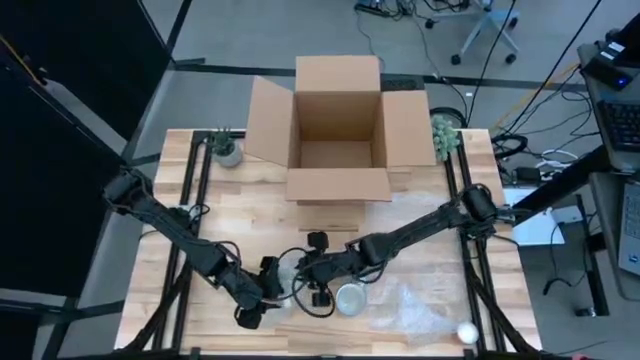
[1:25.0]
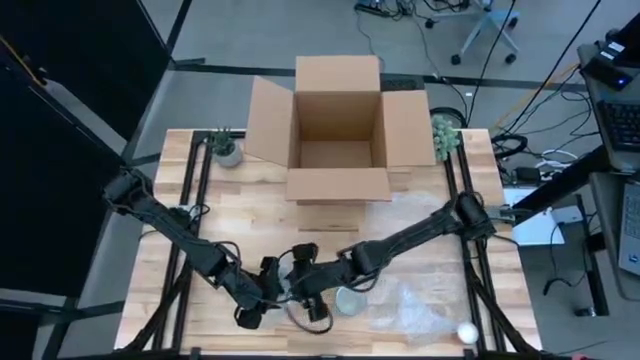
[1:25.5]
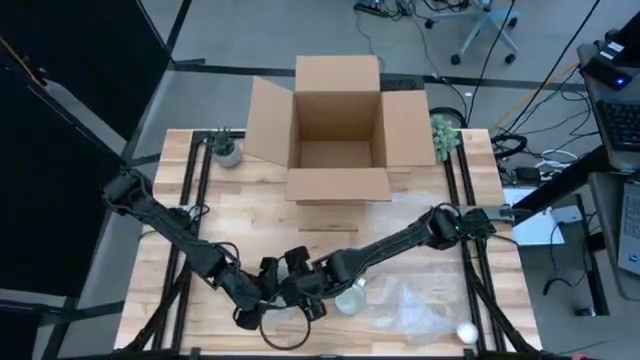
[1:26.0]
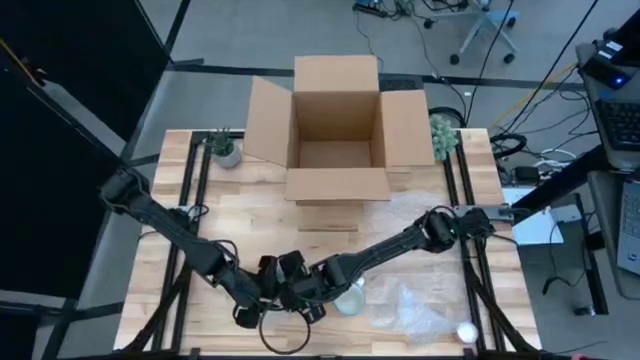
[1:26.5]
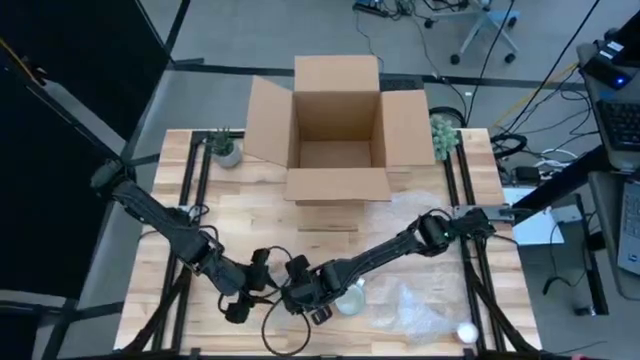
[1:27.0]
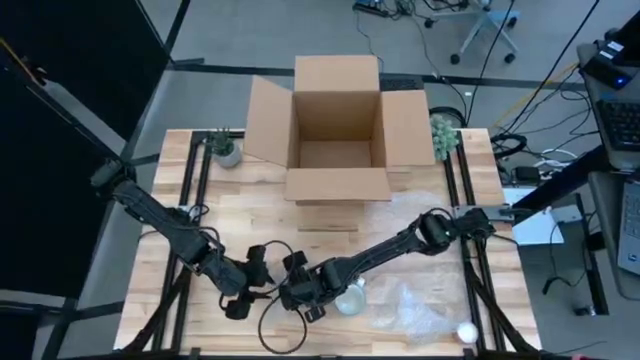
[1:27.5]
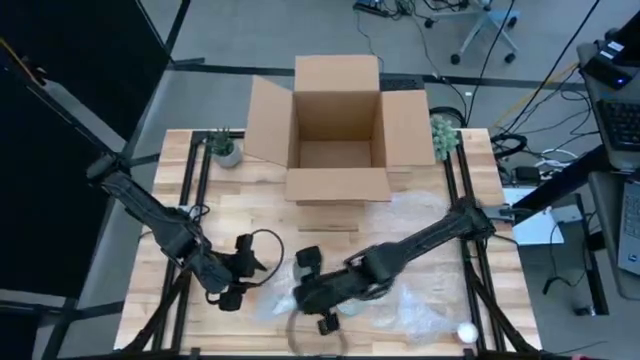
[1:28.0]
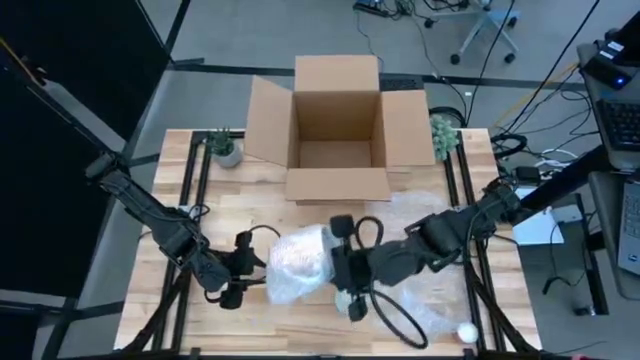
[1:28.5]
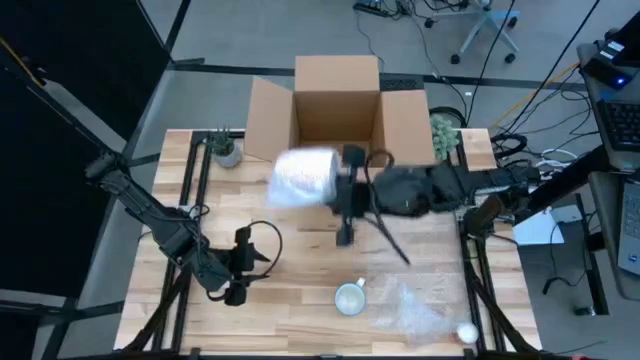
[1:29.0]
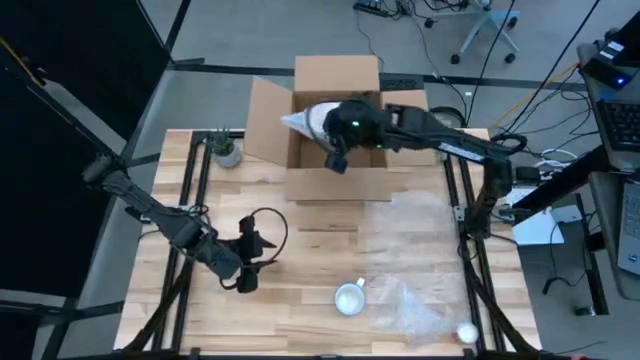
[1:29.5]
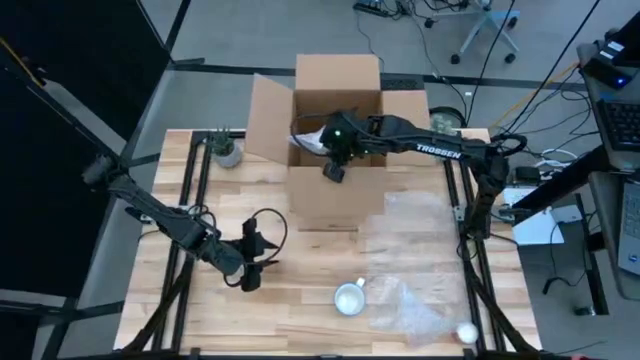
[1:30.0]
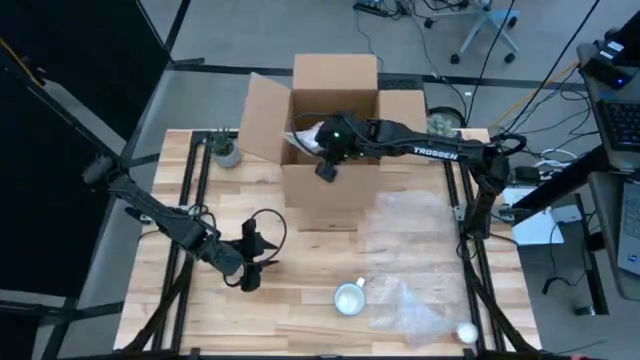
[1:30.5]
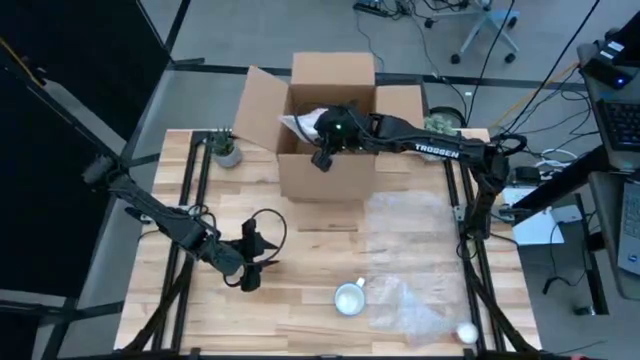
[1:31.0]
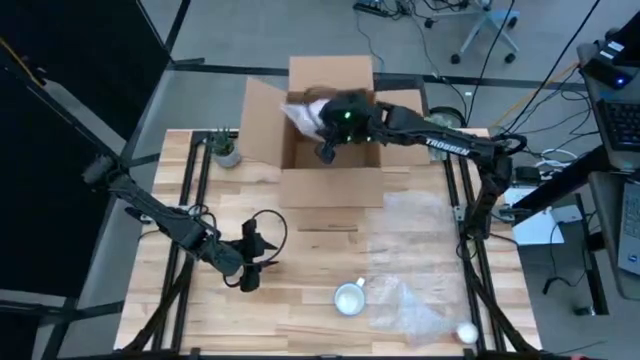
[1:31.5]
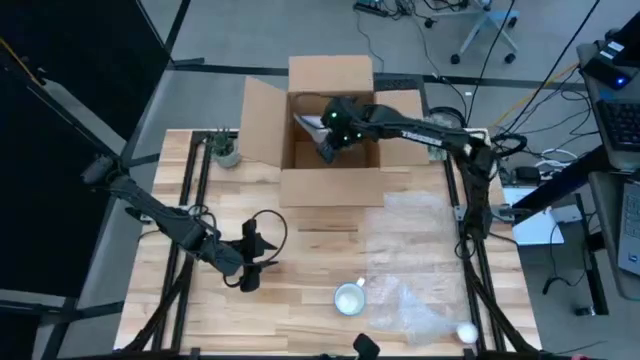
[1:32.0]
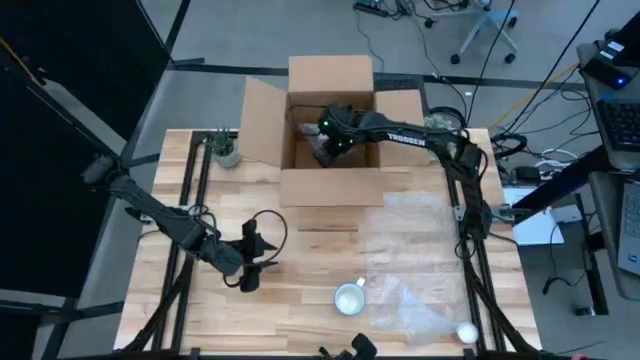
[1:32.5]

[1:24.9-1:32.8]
Task: wrap mug
Put the wrapped yellow mug into the box

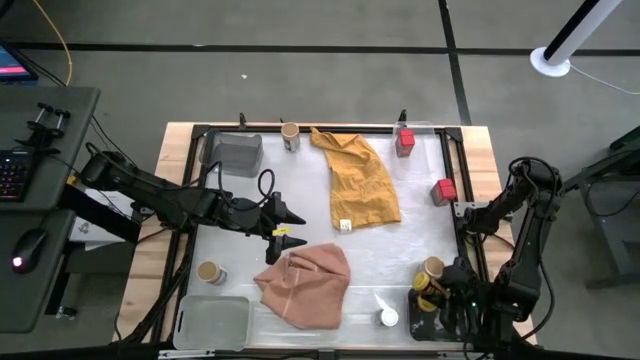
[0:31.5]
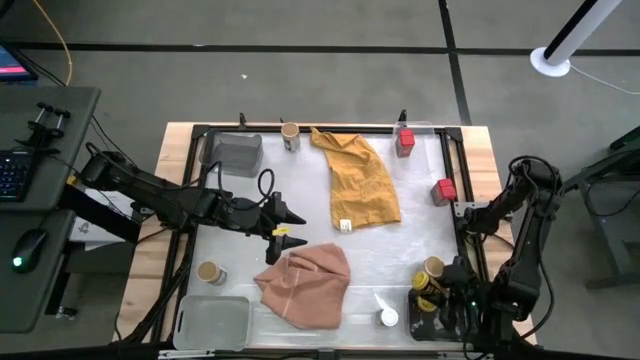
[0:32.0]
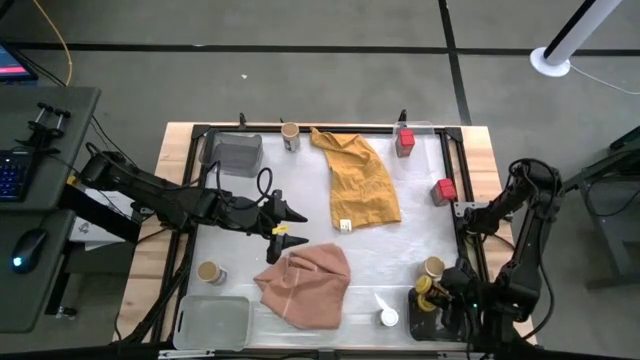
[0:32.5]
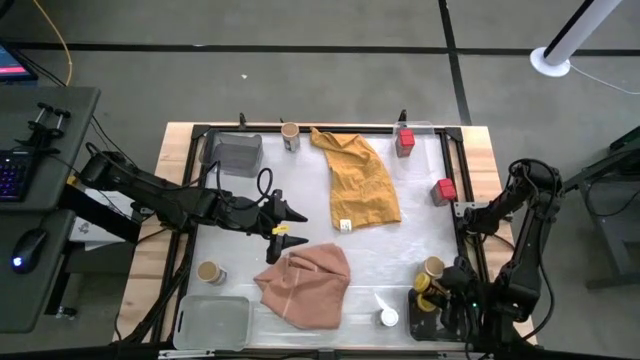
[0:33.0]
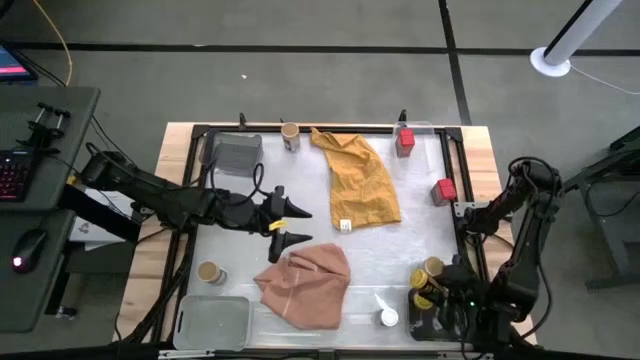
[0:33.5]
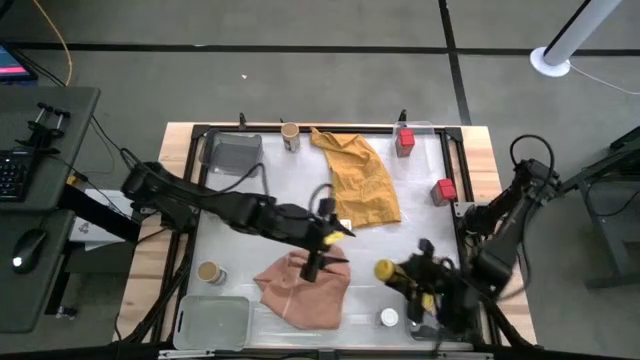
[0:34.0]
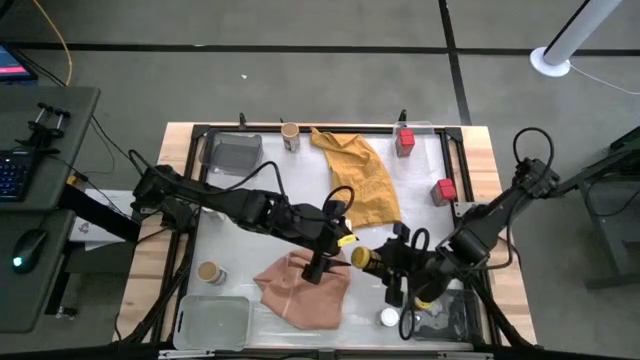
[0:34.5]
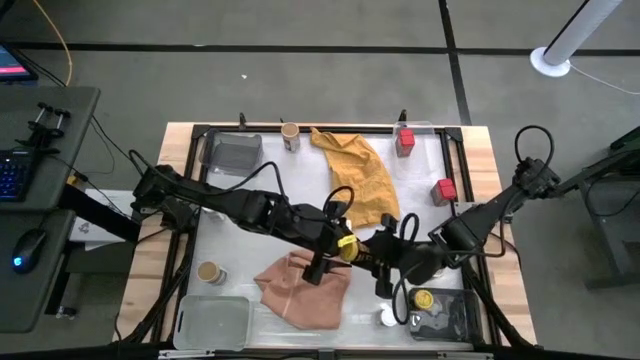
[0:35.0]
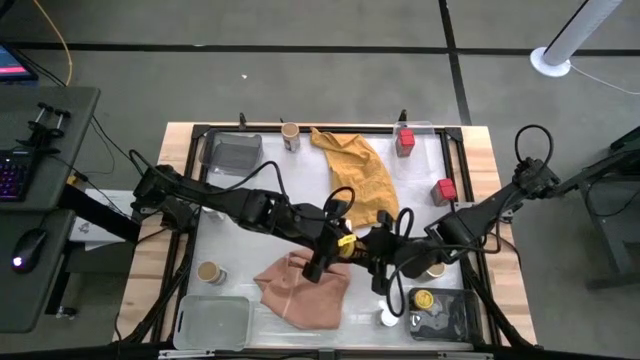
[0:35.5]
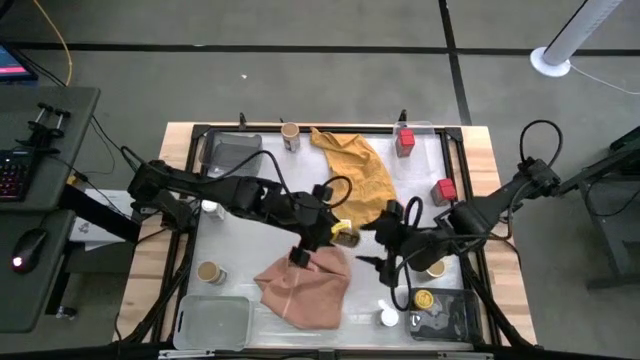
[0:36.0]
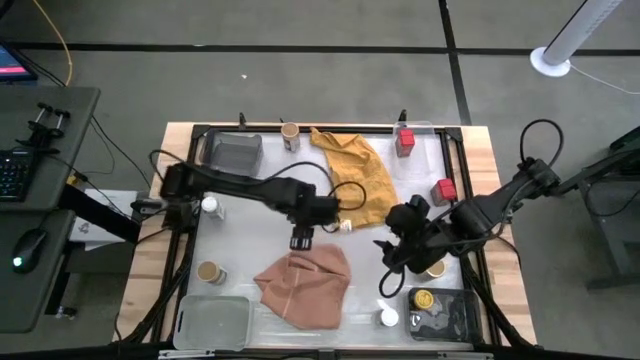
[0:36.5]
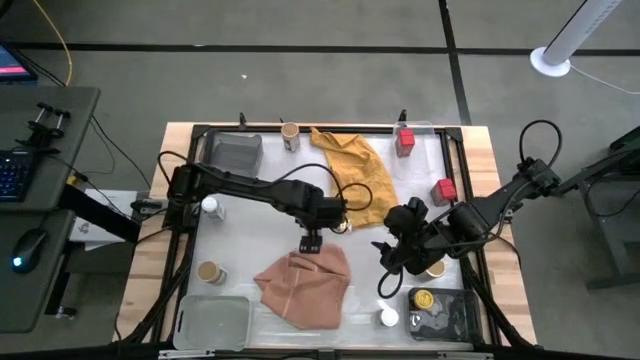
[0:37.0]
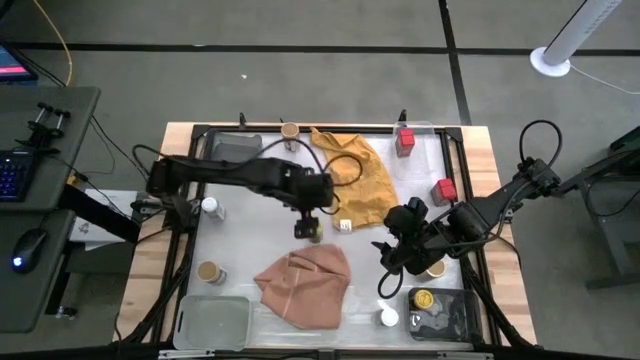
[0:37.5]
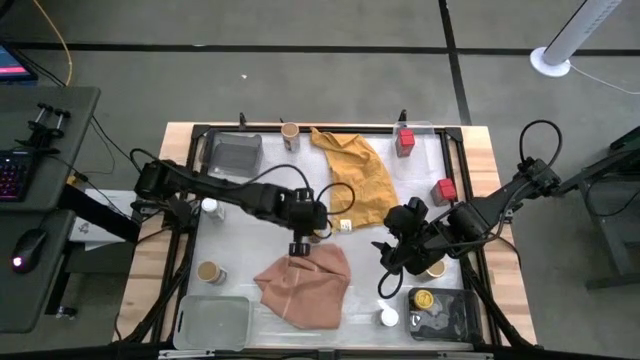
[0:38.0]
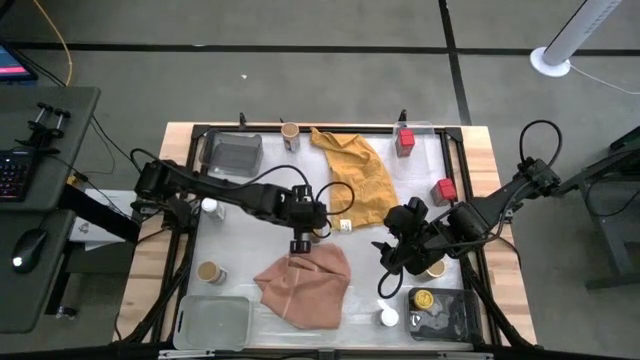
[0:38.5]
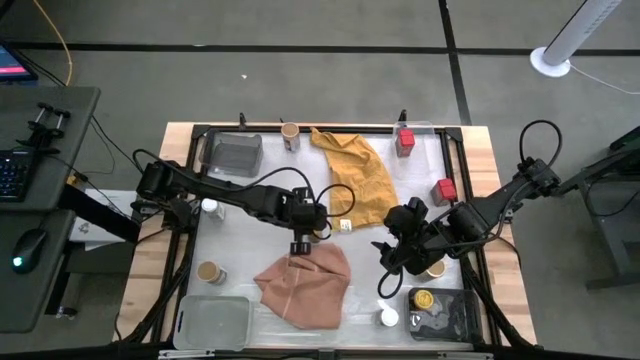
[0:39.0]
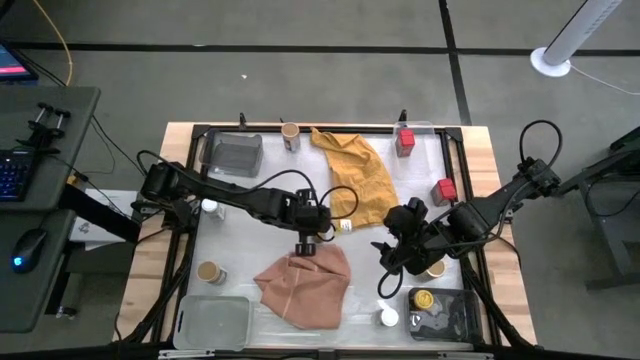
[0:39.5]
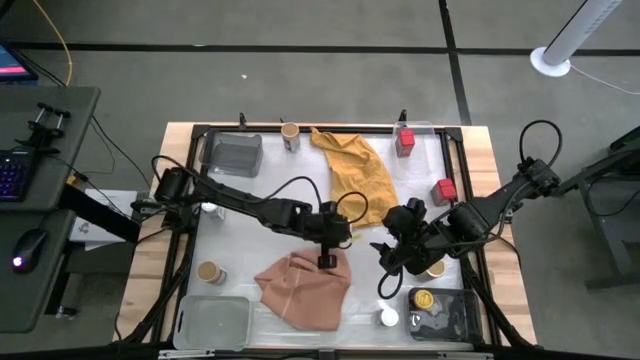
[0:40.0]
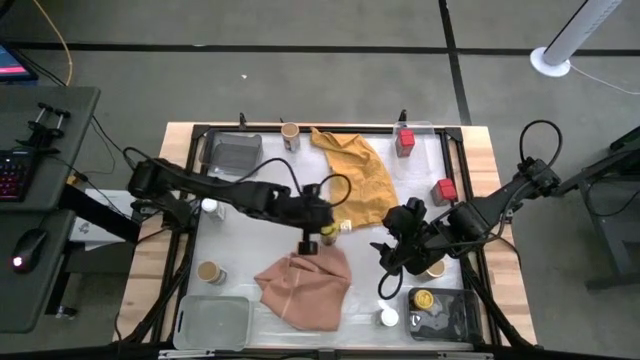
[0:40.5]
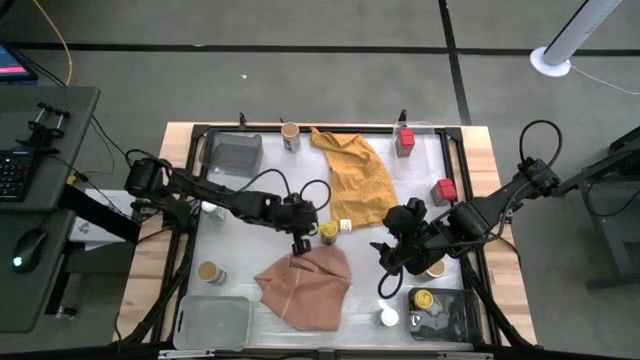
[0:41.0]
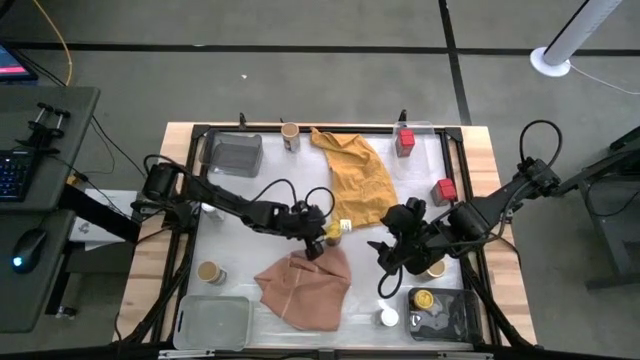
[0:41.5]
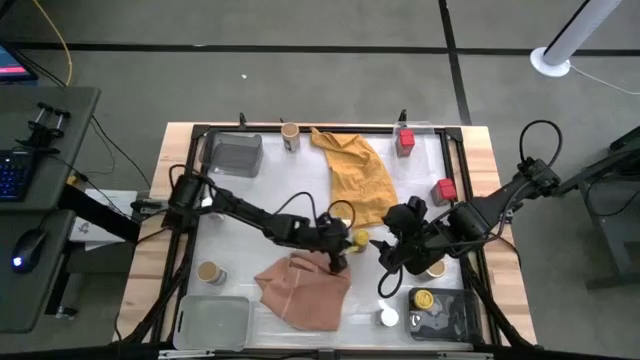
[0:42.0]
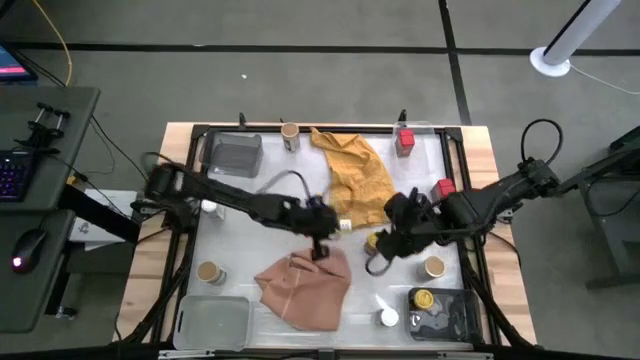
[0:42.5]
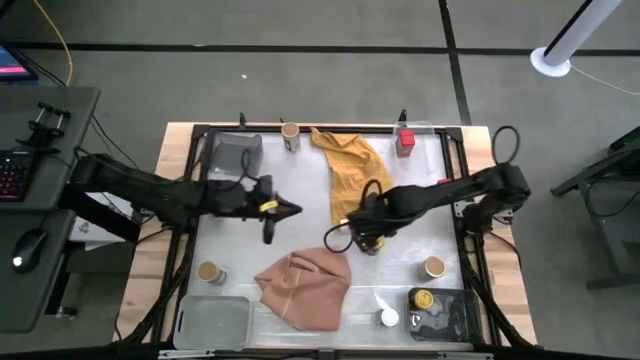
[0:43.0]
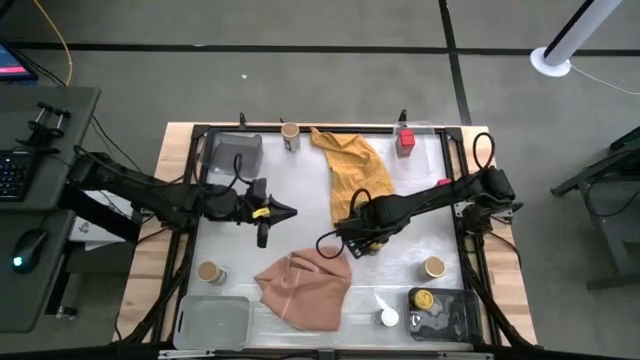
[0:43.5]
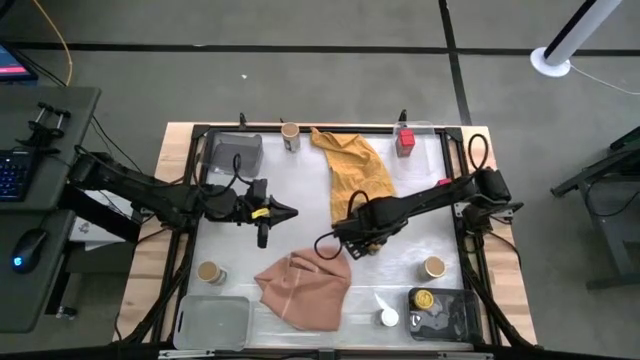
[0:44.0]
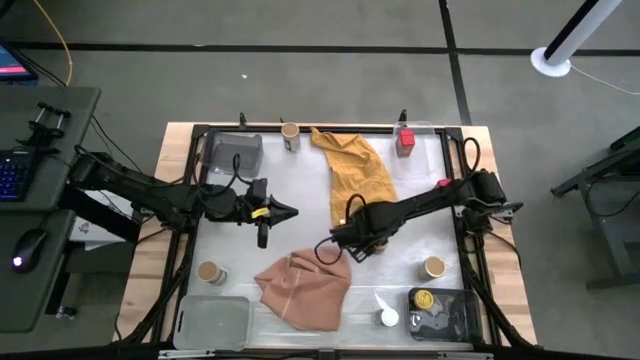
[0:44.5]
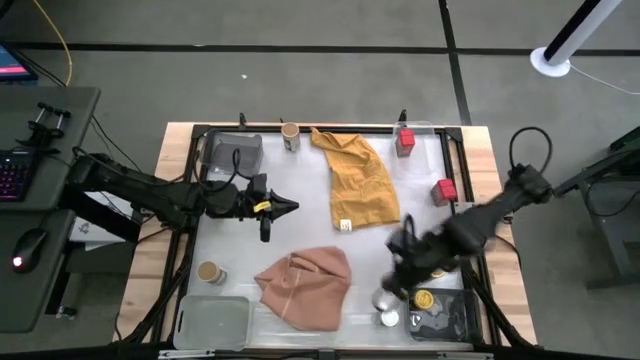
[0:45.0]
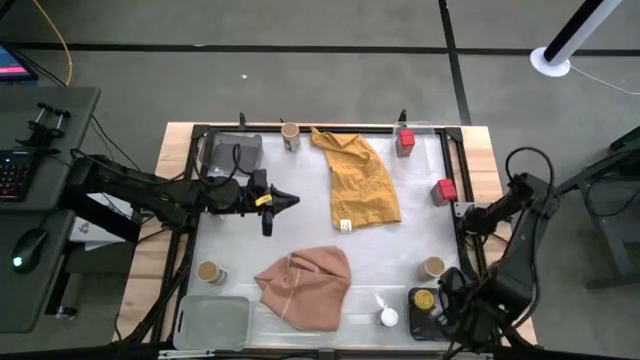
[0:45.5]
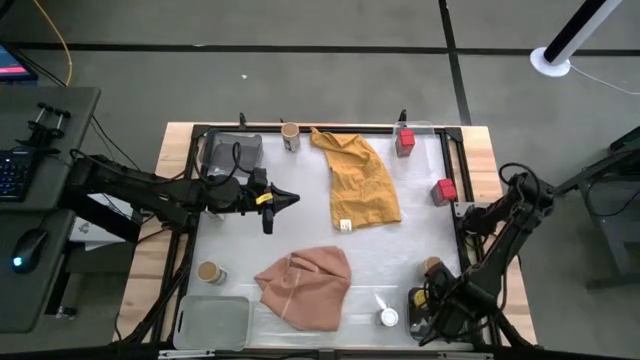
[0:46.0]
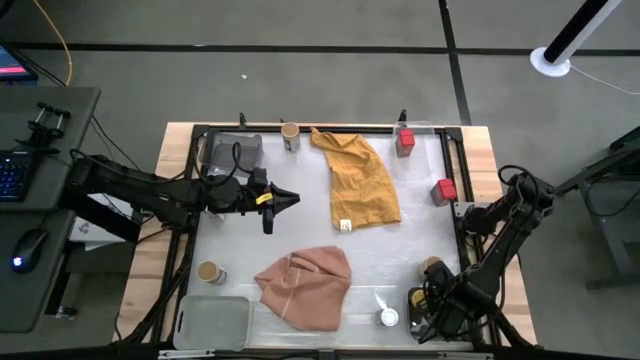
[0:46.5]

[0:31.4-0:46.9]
Task: Sort spices by type
Put the yellow seasoning bottle into the bottom right black bin
